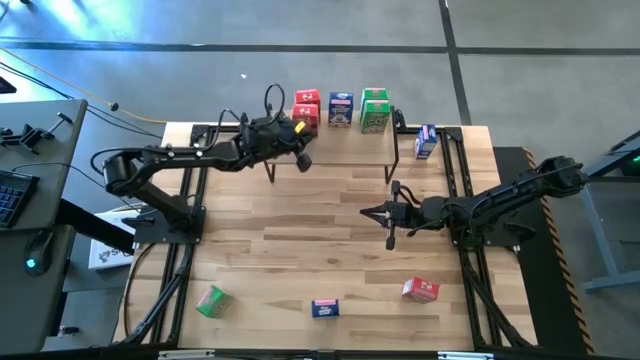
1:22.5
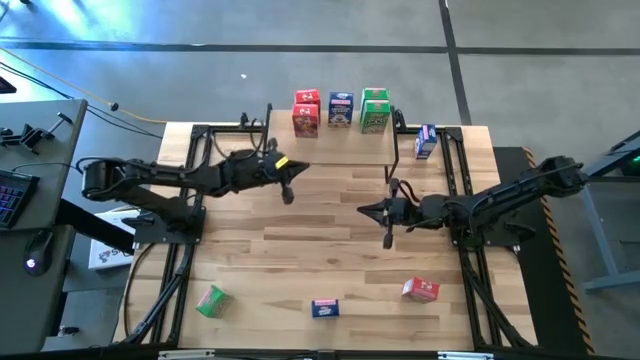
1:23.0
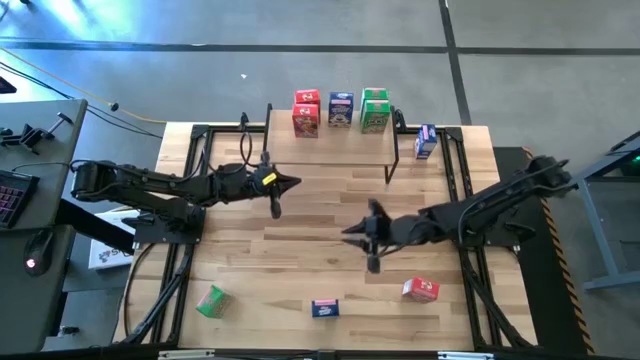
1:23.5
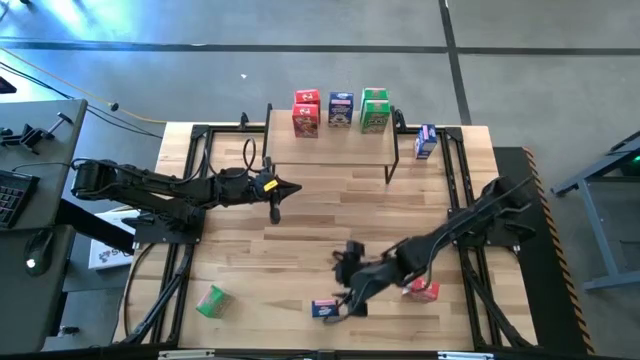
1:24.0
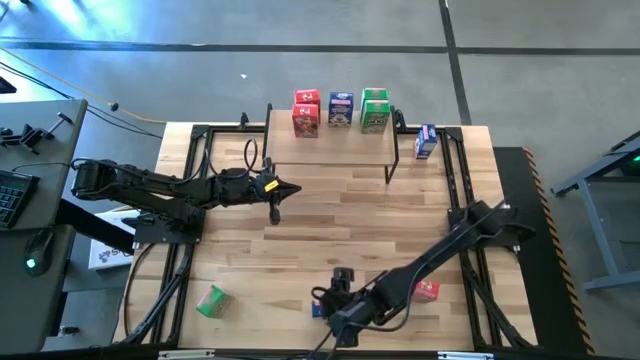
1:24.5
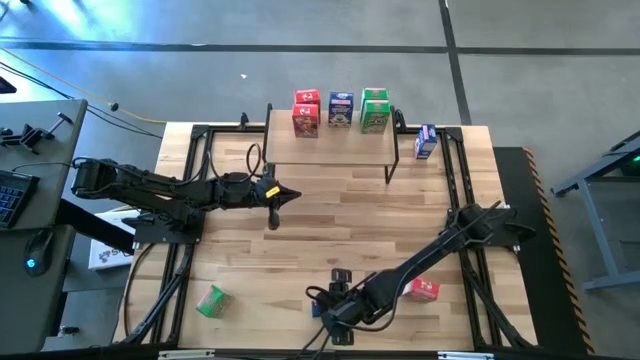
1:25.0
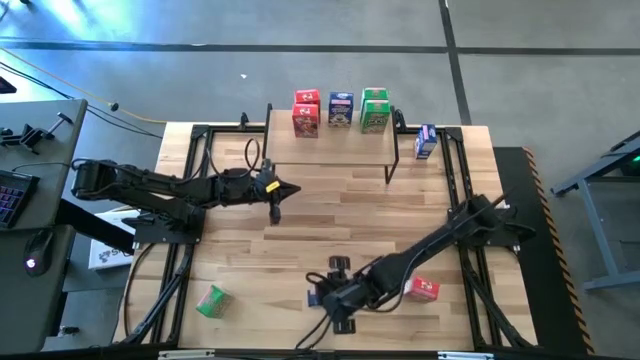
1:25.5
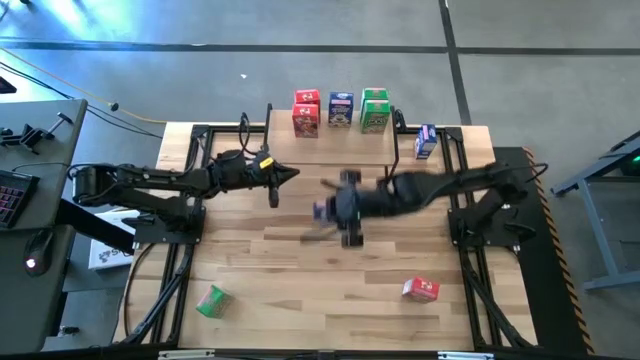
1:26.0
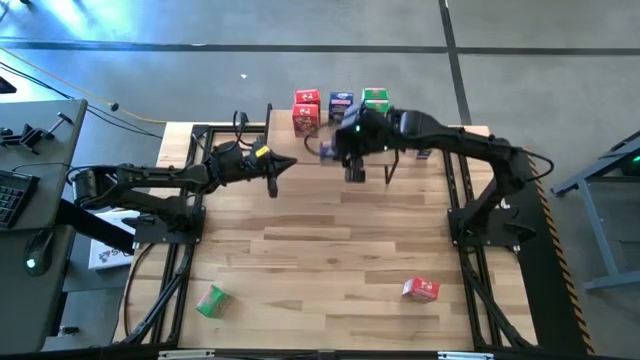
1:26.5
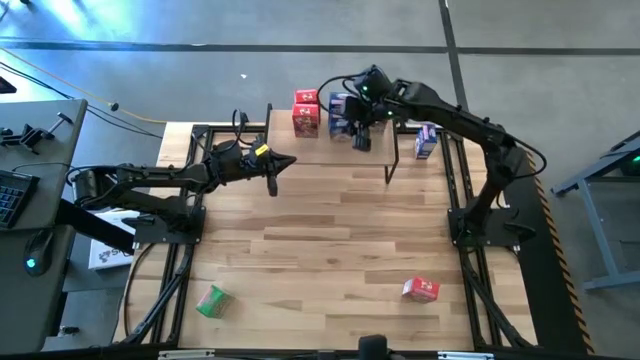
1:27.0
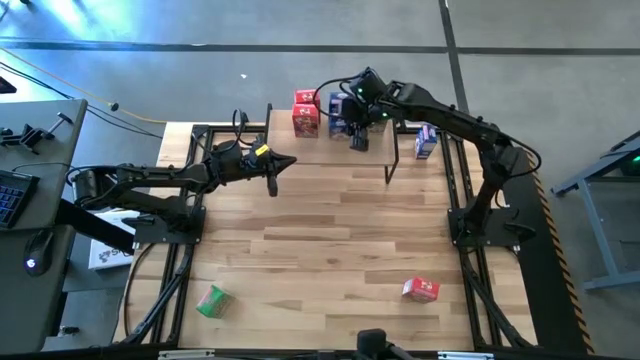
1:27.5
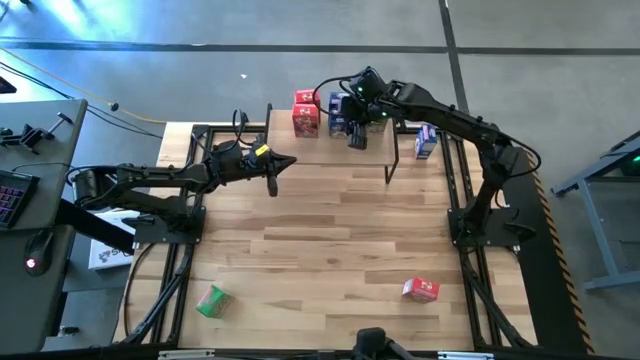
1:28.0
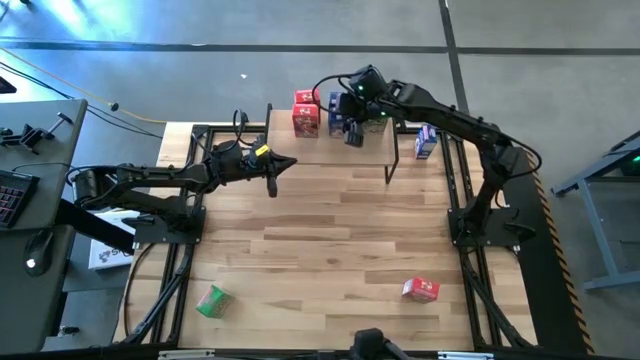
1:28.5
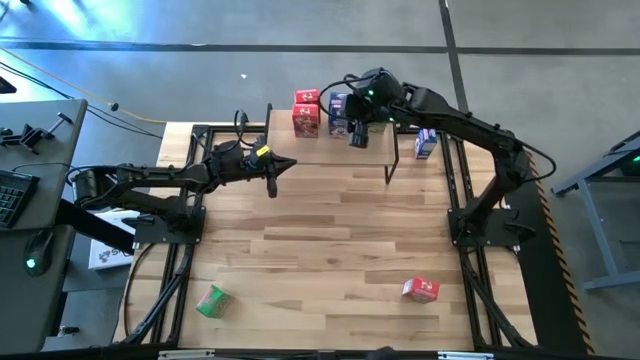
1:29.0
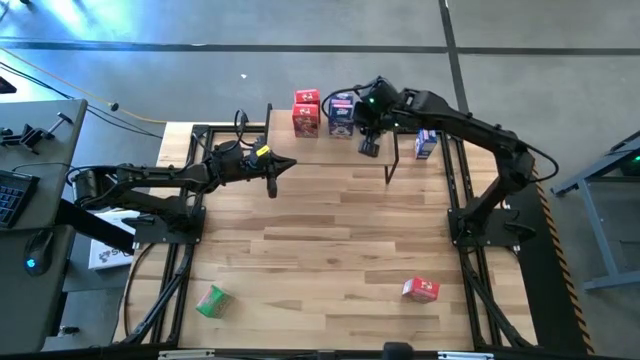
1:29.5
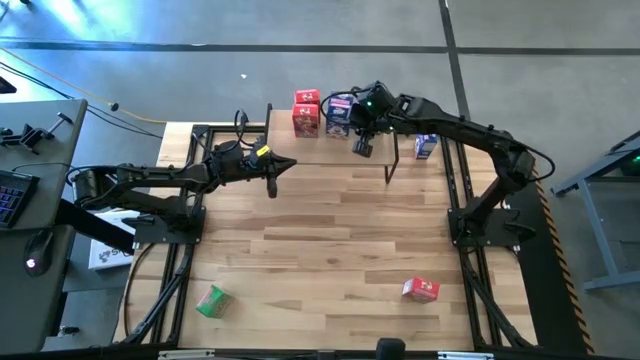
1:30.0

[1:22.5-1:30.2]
Task: Stack cereal on shelf
Put the bottom blue cereal box in front of the other blue cereal box on the shelf

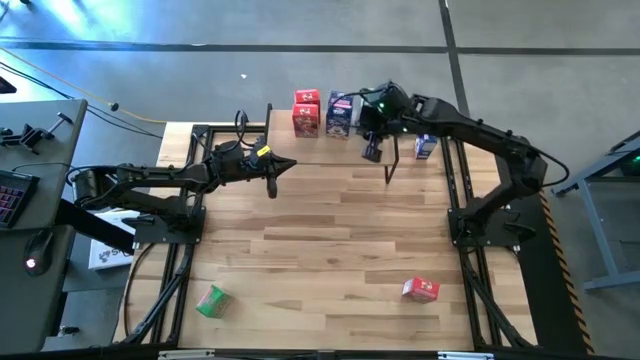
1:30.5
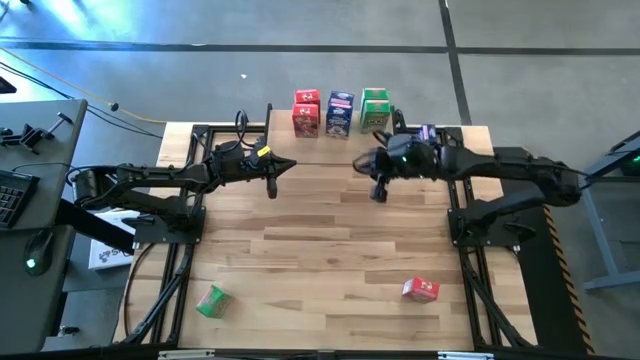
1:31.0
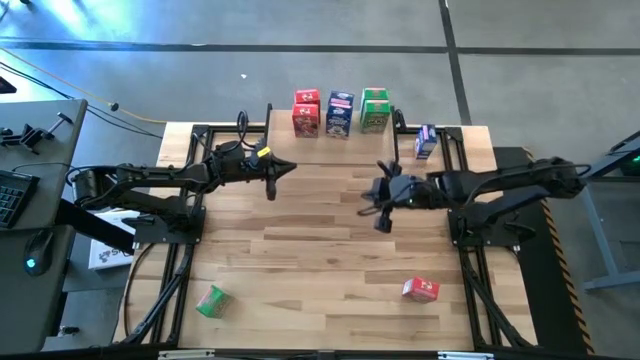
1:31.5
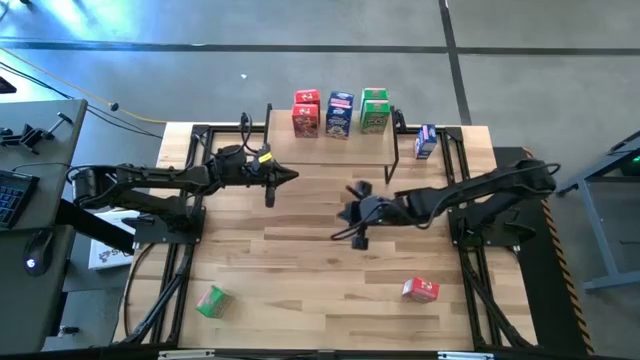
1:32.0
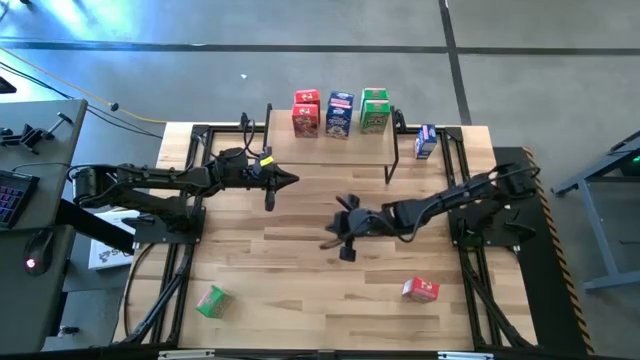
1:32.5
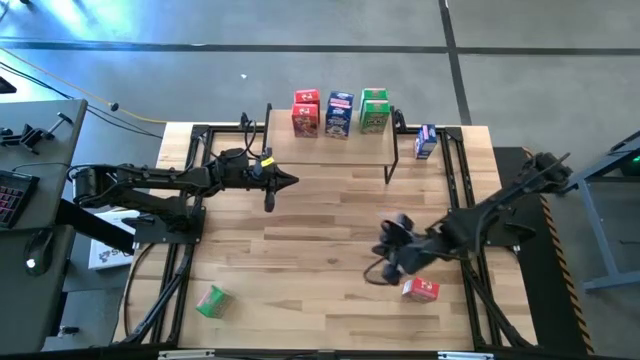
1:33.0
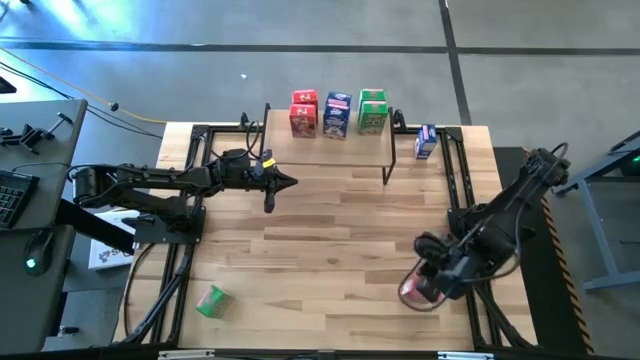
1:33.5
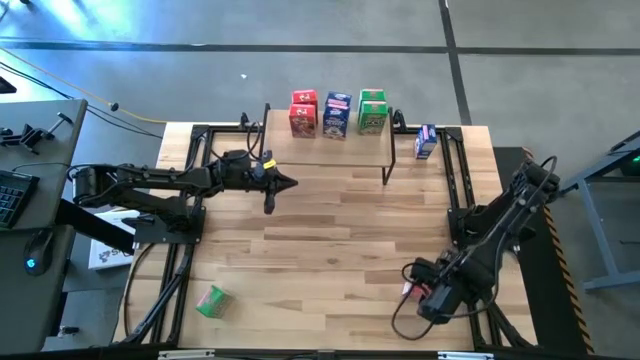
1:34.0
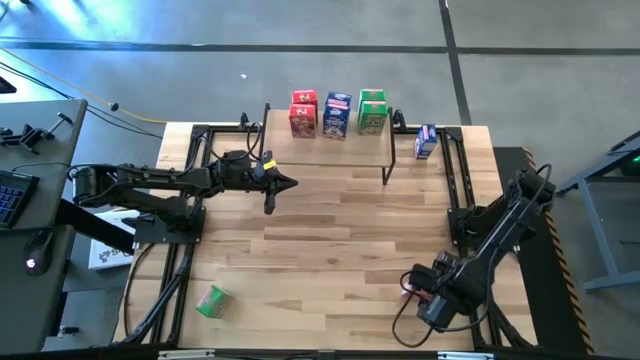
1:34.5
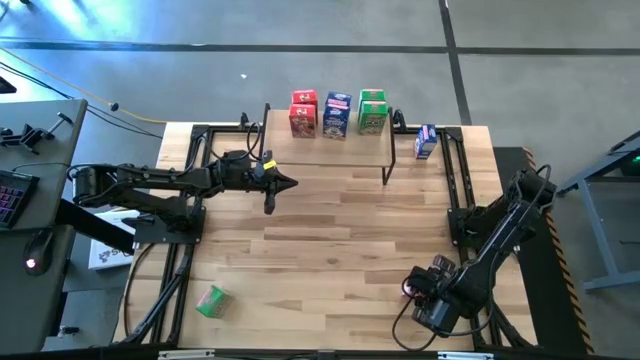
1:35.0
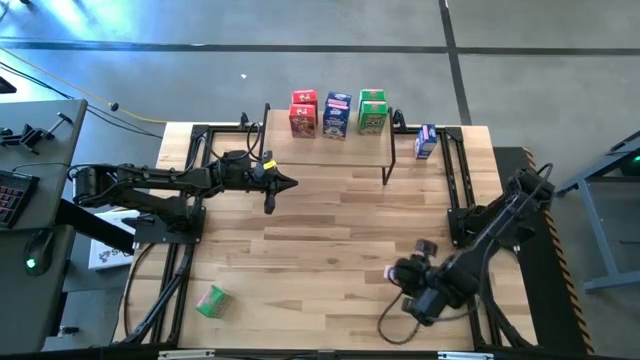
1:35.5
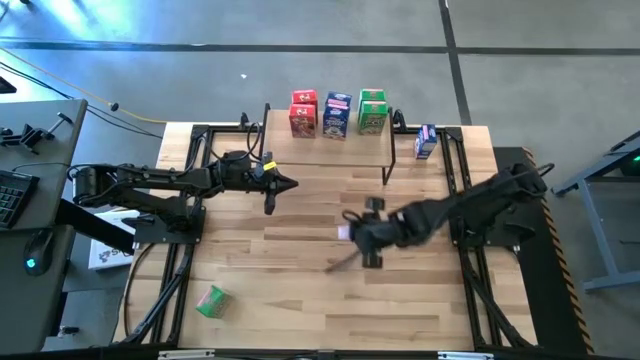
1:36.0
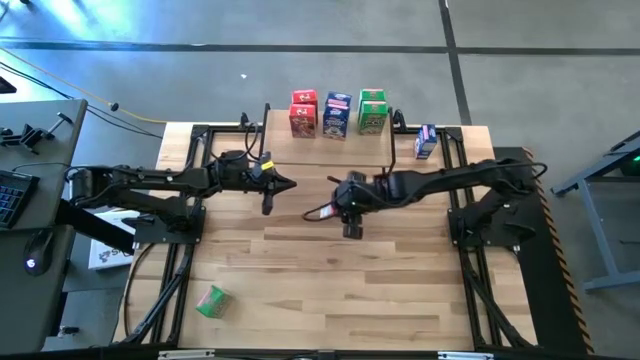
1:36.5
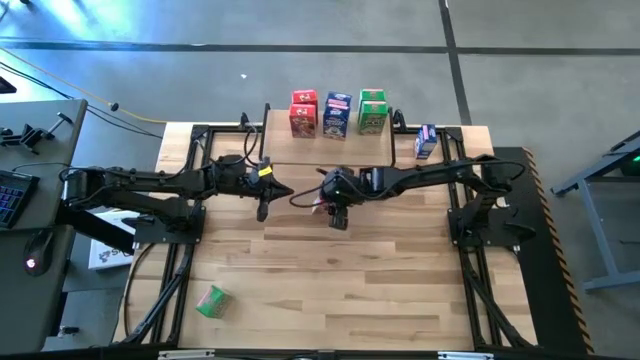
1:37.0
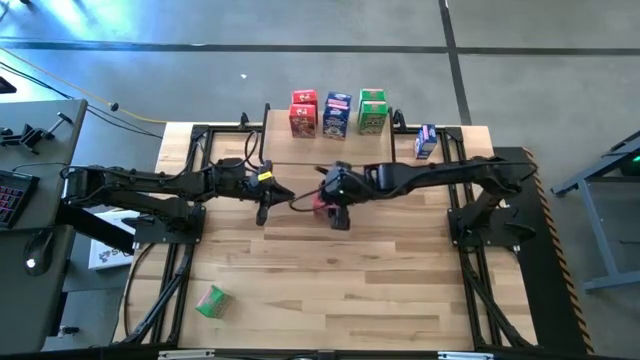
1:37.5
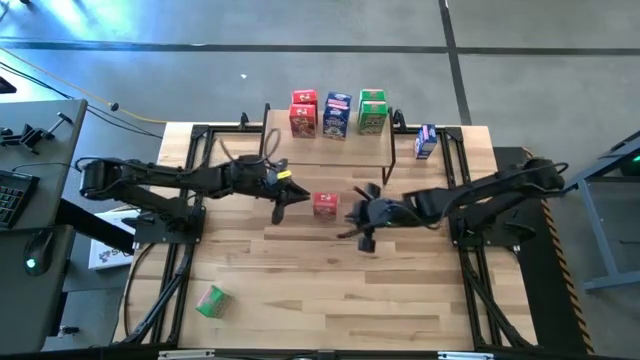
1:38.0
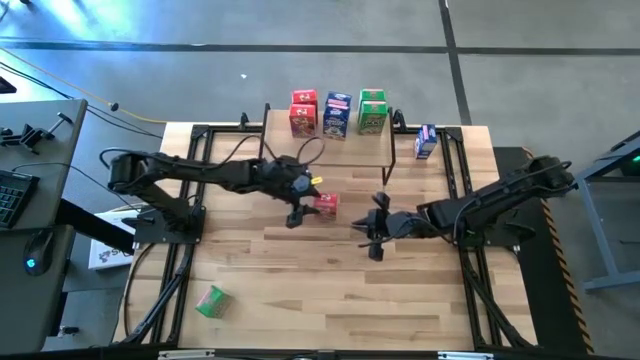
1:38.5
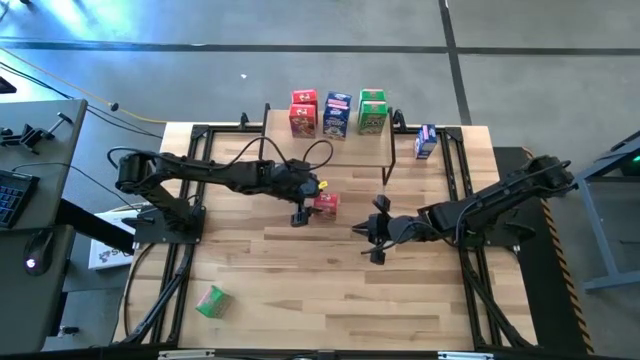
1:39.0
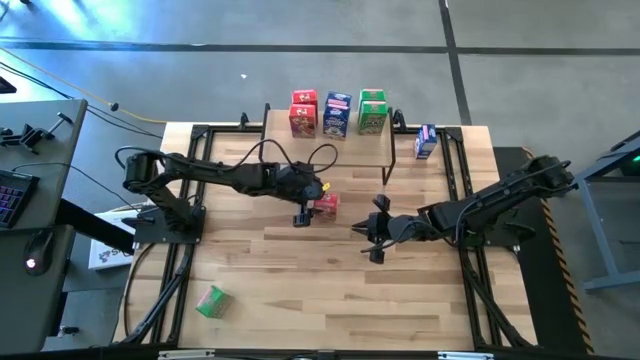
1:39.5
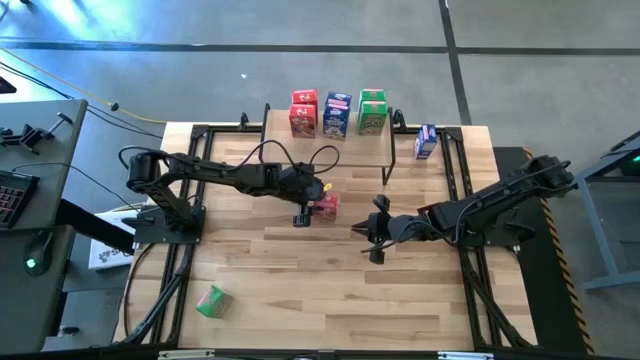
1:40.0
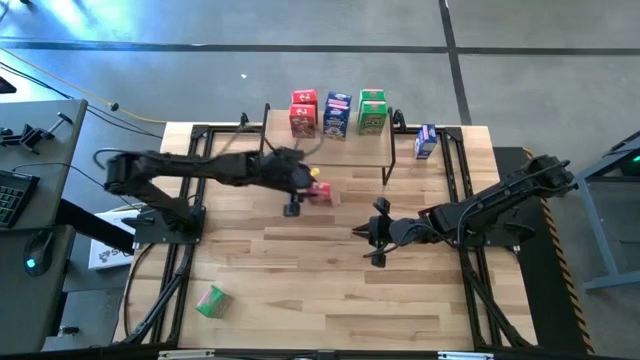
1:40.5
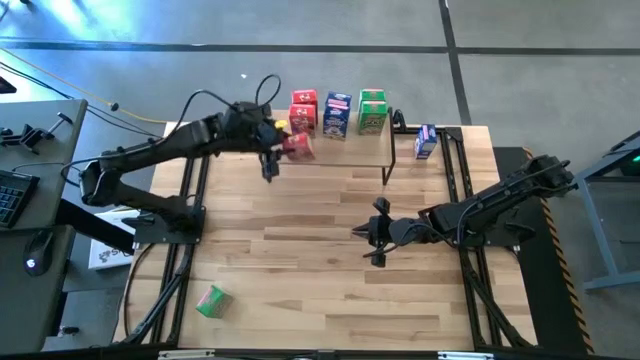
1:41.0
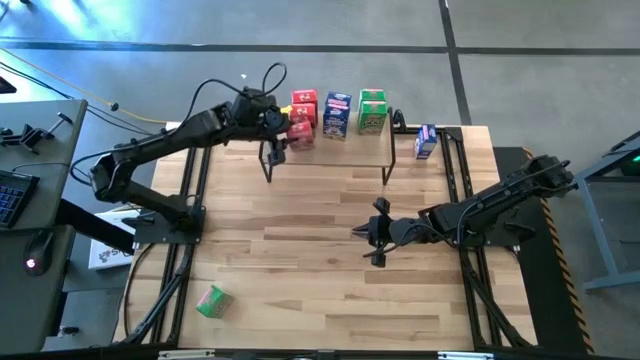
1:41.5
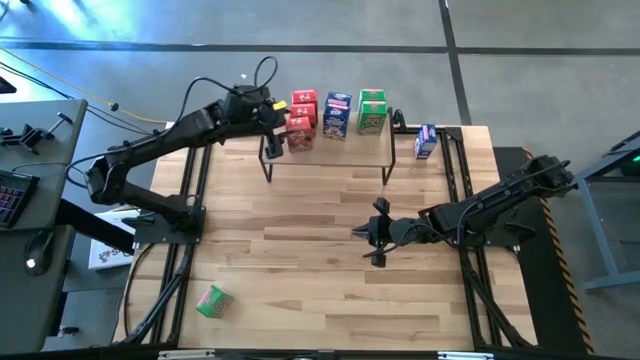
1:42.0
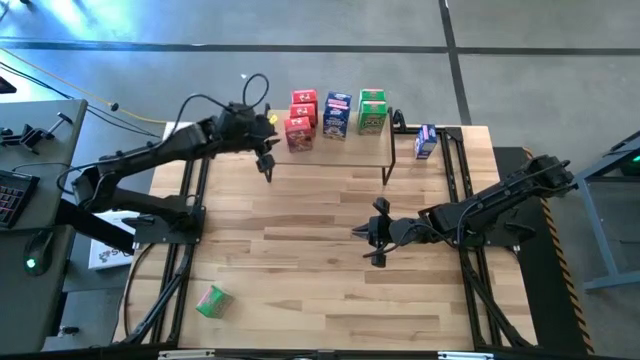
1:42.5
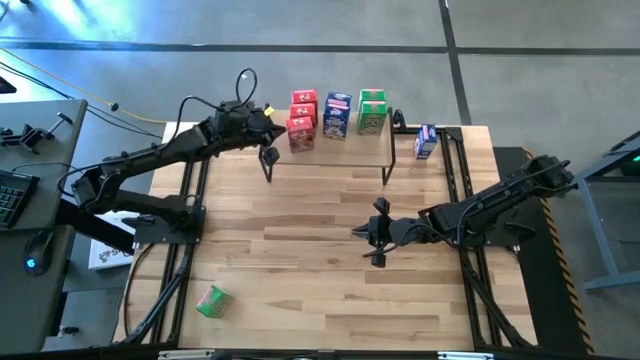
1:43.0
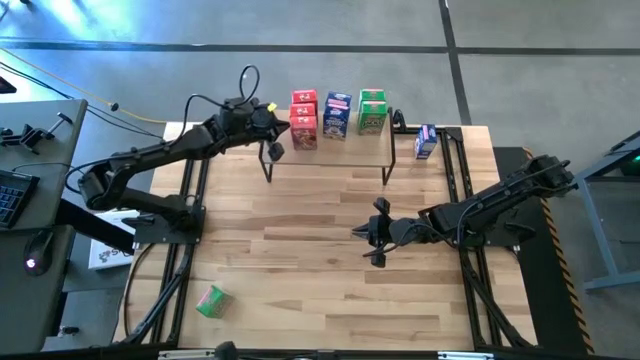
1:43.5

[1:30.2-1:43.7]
Put the red cereal box in front of the other red cereal box on the shelf
